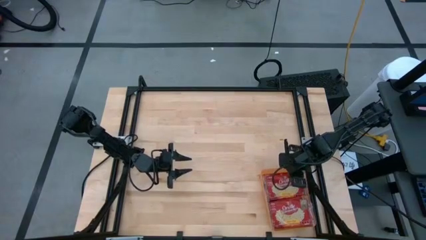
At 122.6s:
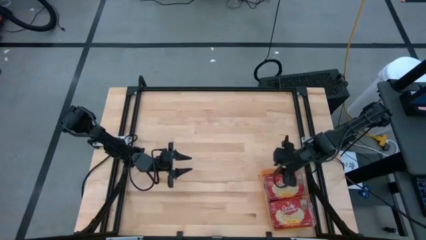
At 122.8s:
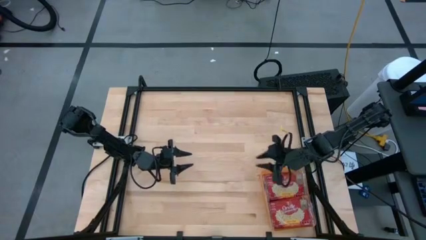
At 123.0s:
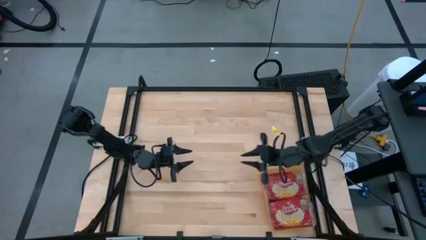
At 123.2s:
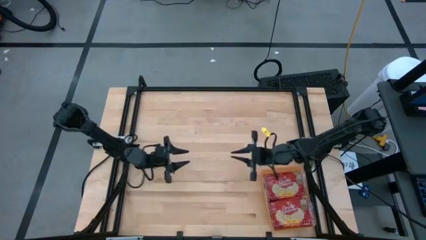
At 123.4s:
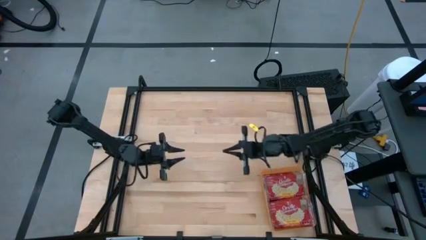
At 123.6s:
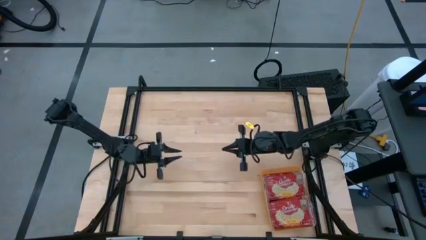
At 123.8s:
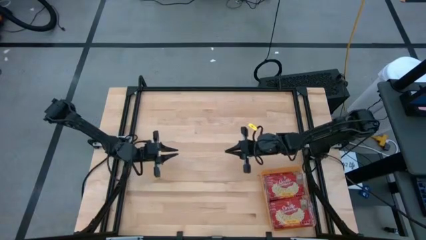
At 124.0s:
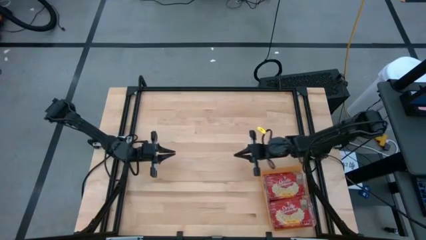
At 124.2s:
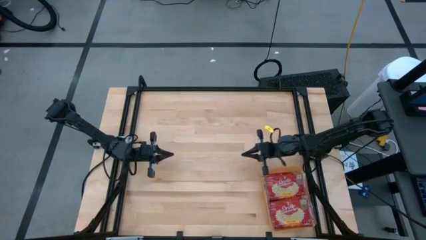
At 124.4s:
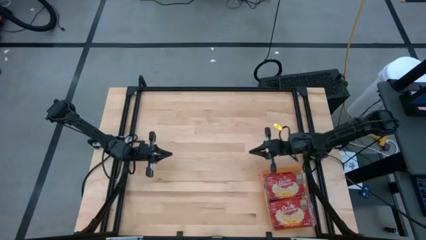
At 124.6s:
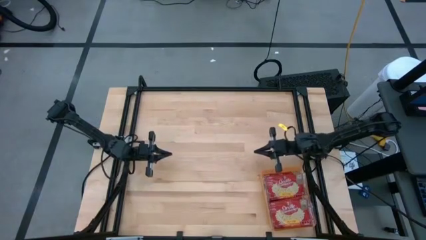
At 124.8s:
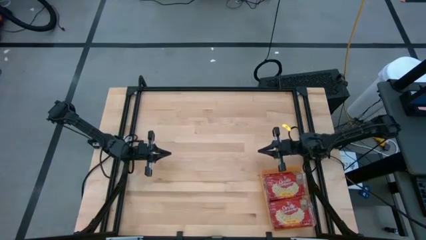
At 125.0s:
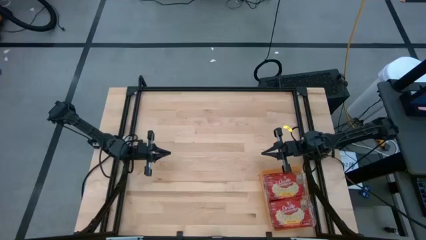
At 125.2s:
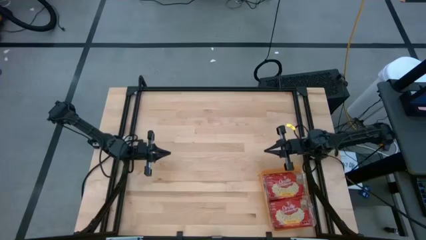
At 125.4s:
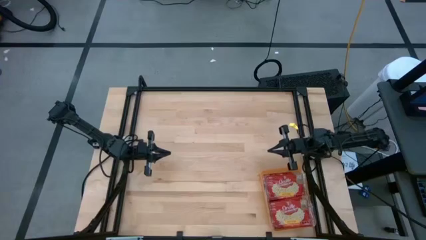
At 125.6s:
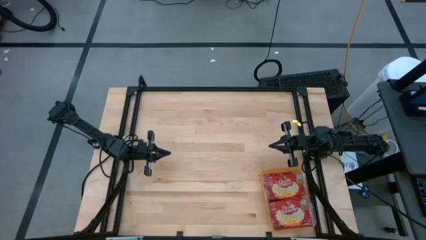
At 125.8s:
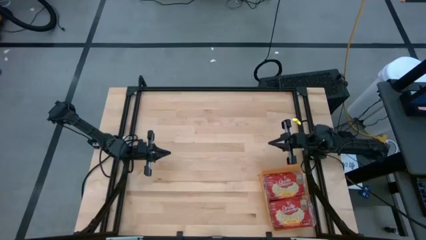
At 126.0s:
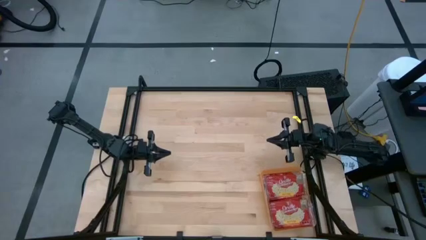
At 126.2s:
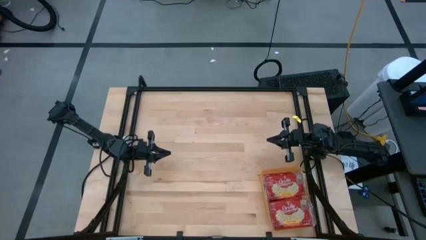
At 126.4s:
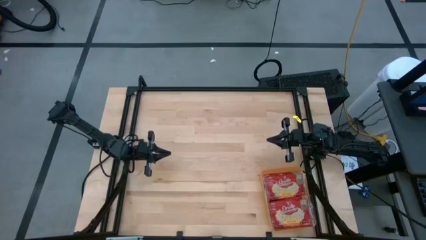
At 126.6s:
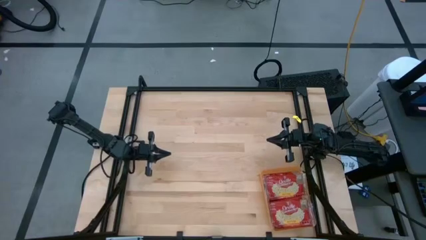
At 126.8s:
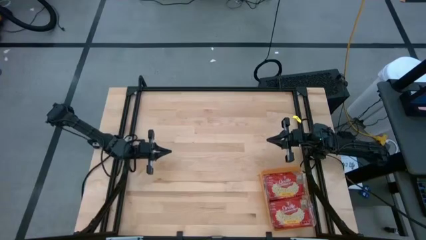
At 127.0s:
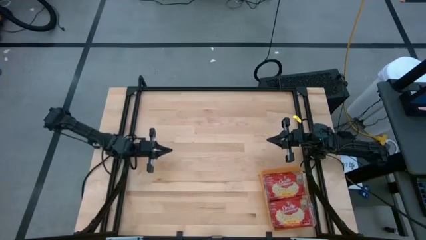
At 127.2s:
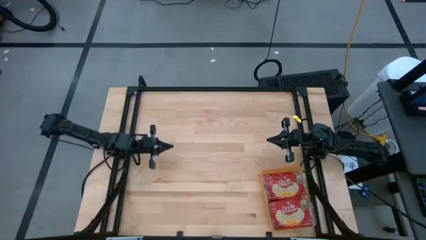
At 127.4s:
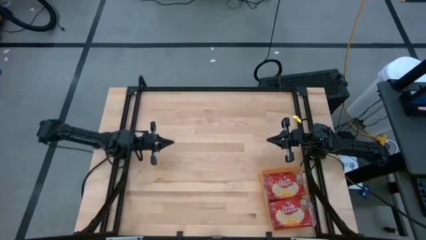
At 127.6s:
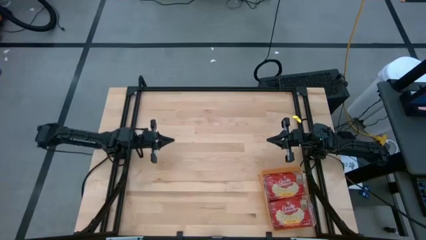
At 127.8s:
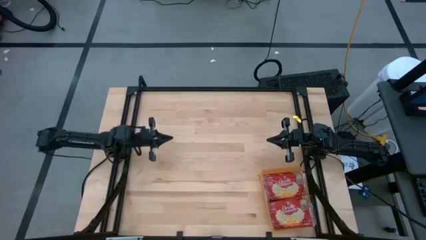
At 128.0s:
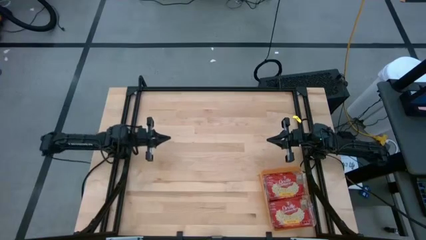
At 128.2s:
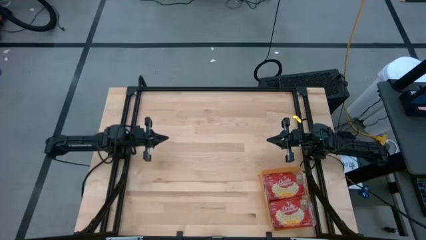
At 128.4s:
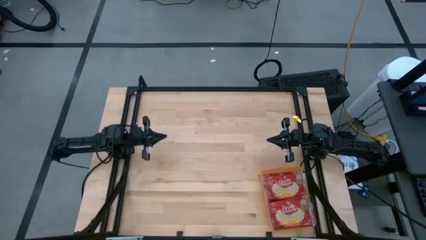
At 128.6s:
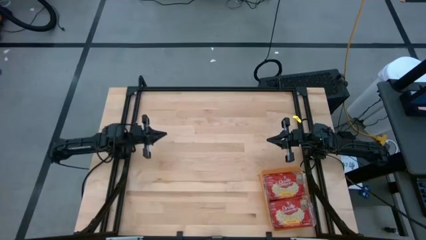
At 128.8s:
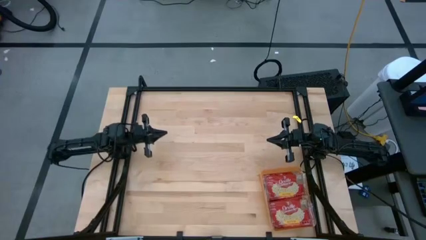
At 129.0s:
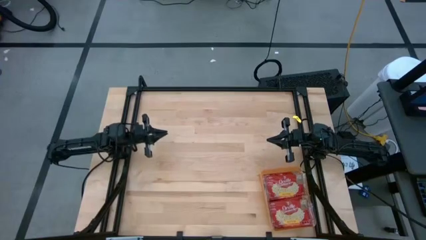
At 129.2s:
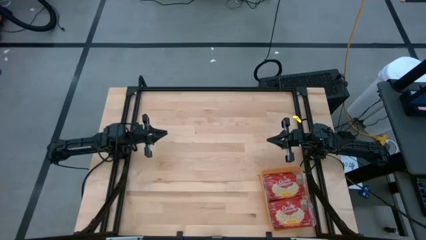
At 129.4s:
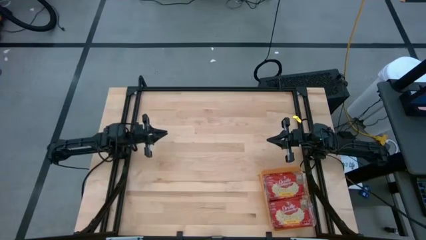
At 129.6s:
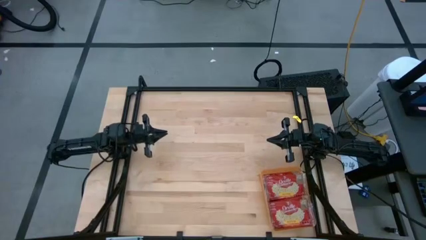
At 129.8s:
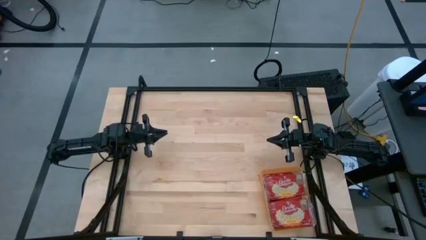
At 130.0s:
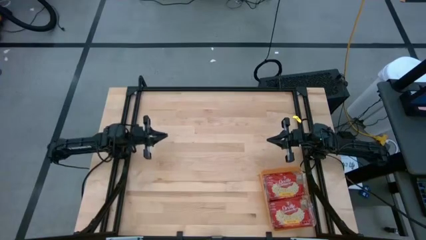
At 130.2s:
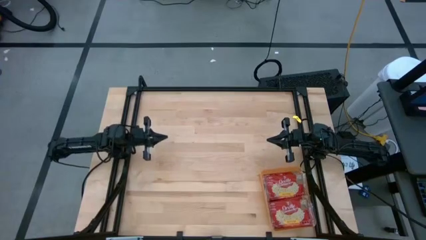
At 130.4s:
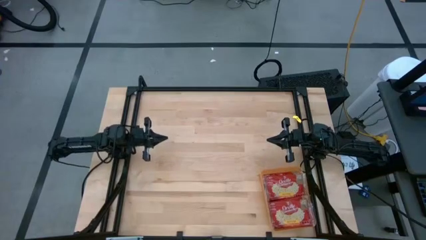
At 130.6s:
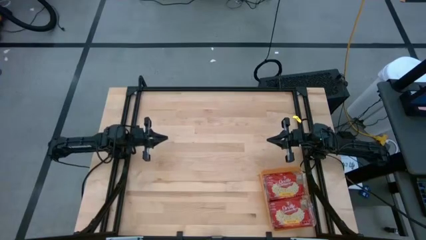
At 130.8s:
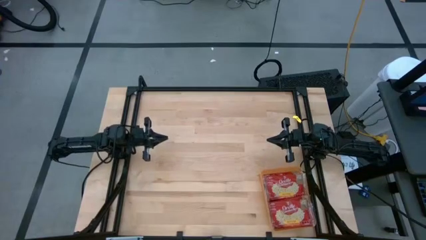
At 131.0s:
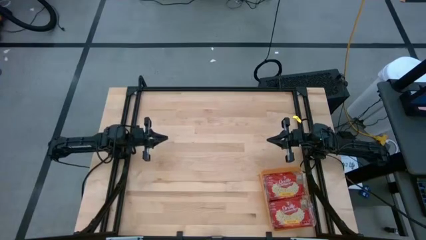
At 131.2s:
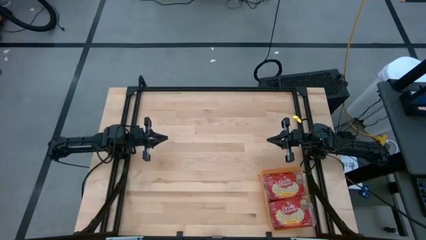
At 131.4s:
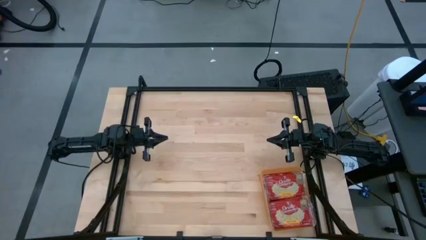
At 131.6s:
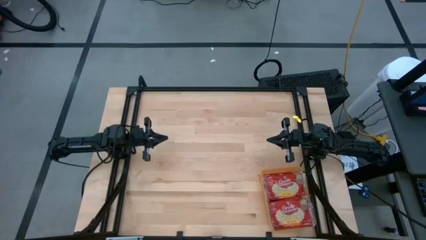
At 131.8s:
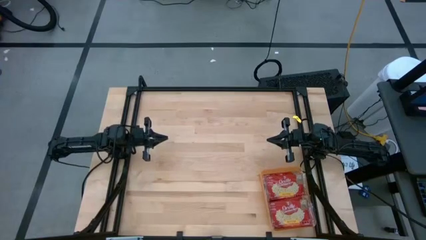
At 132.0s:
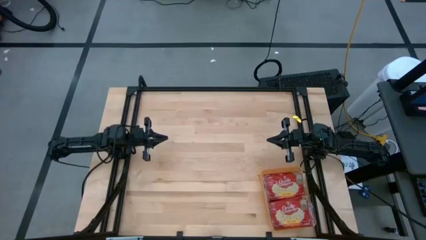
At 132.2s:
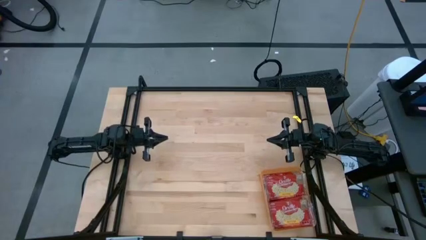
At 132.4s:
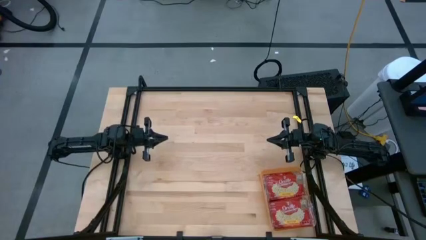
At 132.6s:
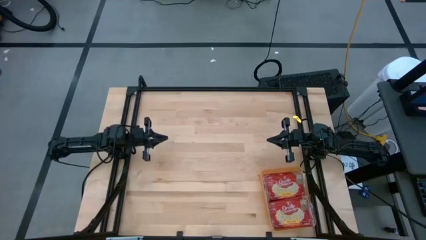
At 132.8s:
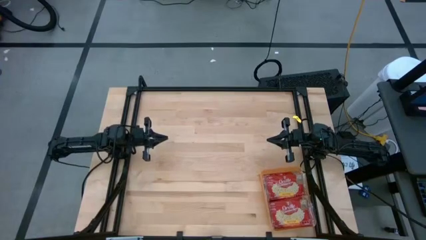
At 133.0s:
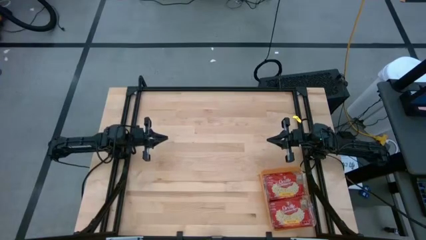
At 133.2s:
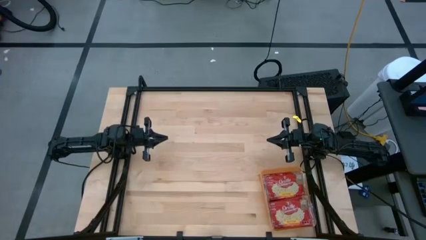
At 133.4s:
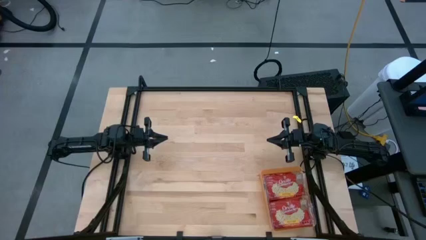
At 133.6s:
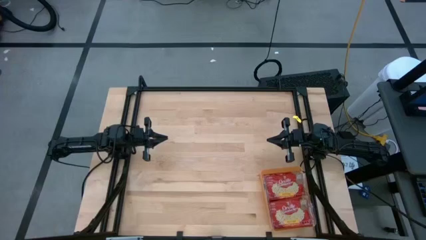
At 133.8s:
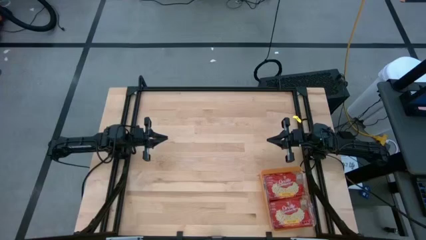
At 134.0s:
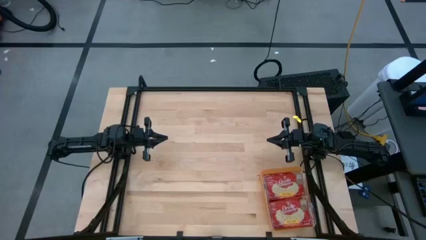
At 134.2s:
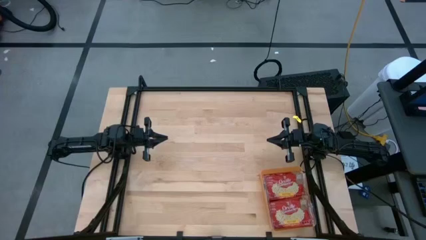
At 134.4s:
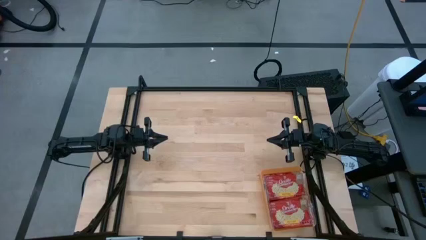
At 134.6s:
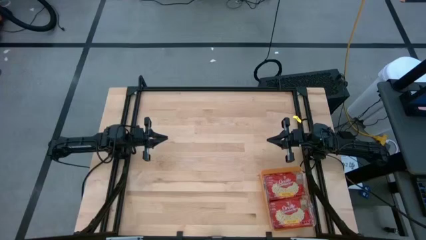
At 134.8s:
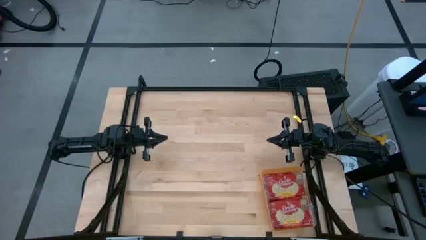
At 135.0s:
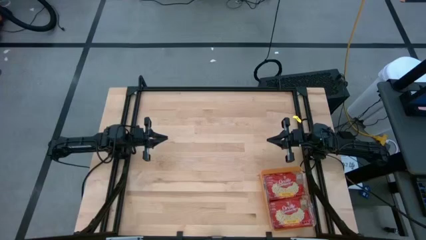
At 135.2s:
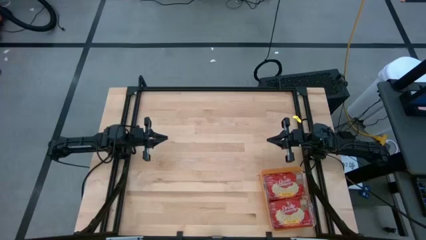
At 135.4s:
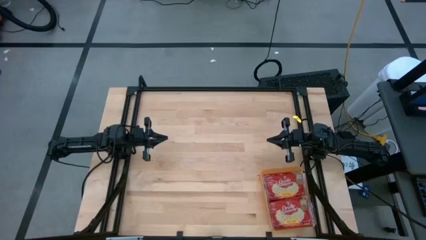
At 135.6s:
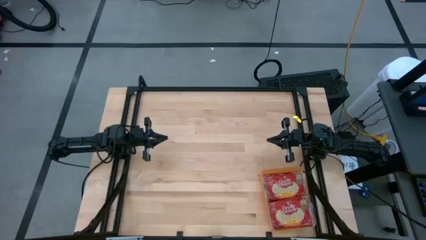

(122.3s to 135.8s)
Task: Sort popcorn bags into baskets
Return to Home Position

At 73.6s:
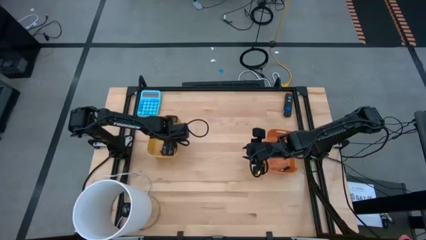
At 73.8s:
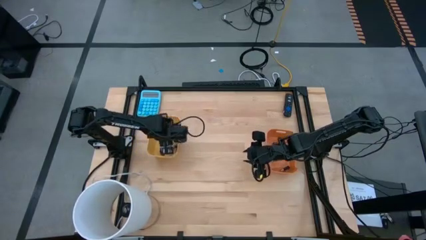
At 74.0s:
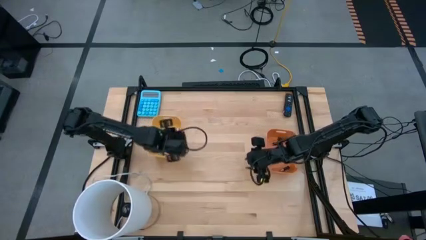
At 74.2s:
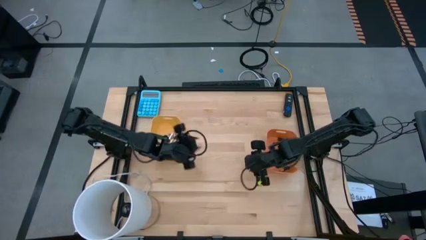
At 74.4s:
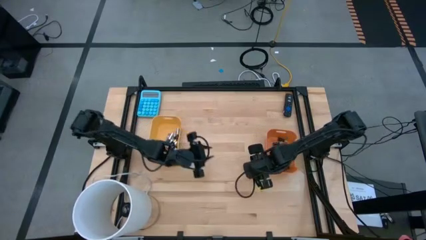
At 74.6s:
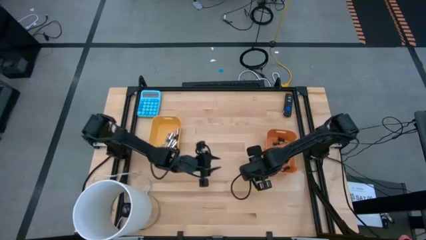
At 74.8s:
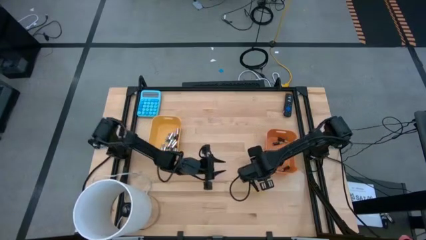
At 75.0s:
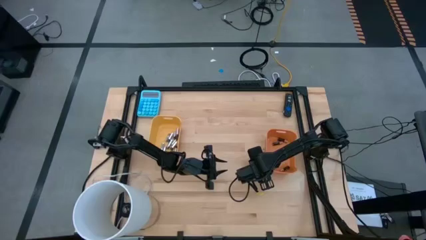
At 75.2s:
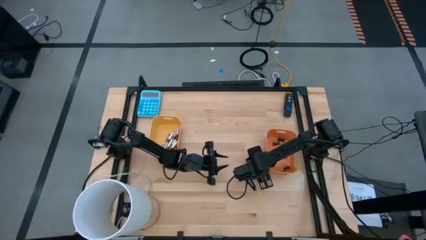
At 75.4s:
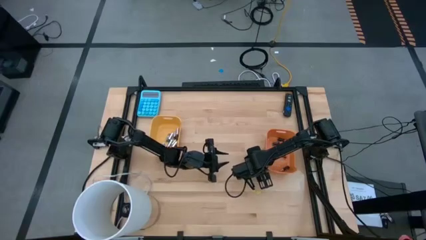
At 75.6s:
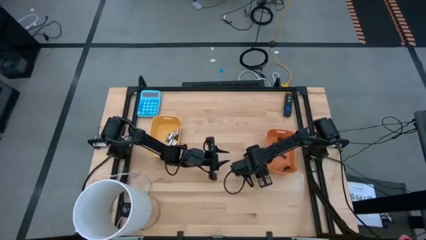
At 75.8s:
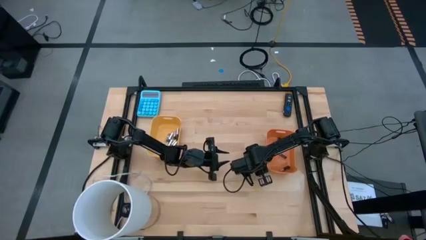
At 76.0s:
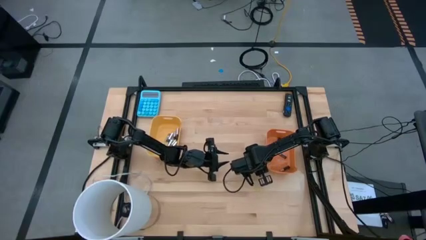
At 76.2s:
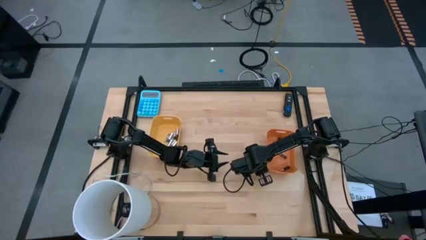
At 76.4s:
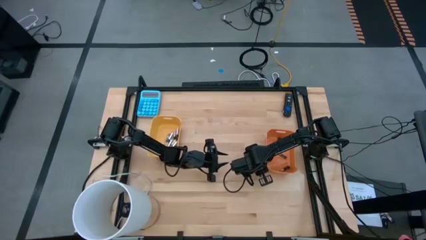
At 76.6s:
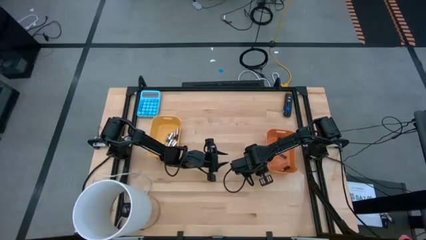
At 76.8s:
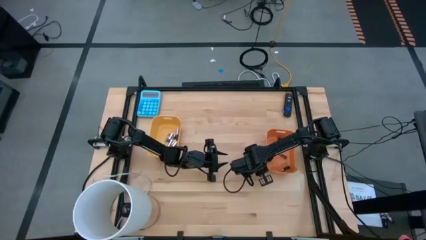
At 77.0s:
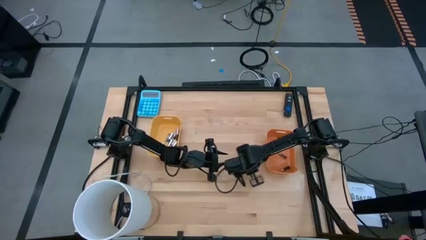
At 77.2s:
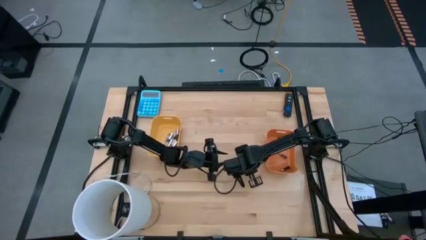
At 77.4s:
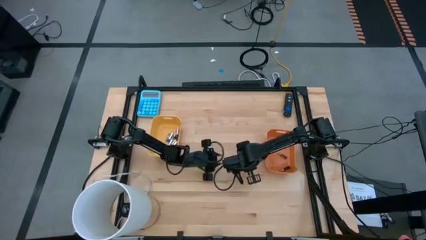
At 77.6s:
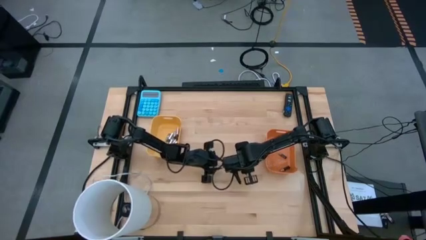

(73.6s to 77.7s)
Task: Sort batteries
Put the black battery into the orange bin

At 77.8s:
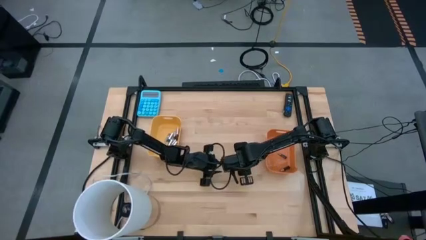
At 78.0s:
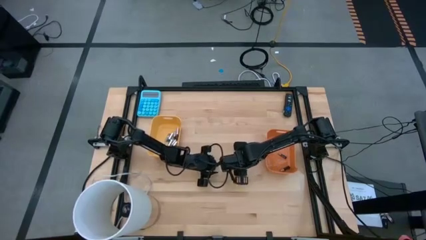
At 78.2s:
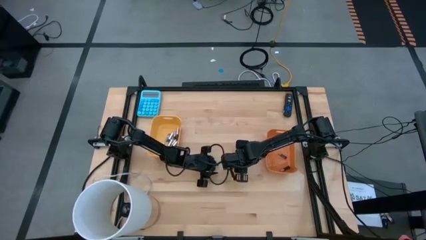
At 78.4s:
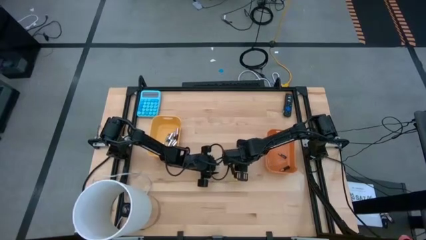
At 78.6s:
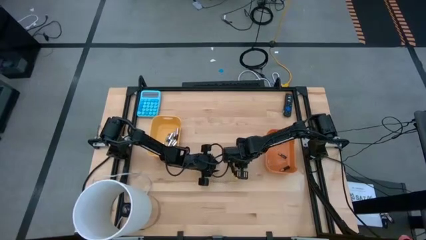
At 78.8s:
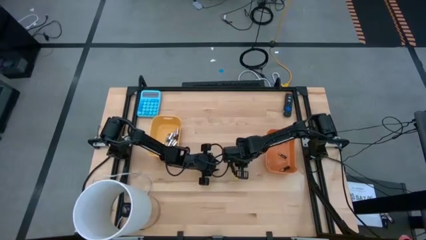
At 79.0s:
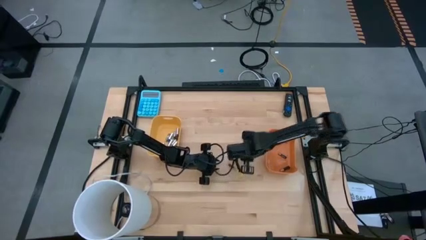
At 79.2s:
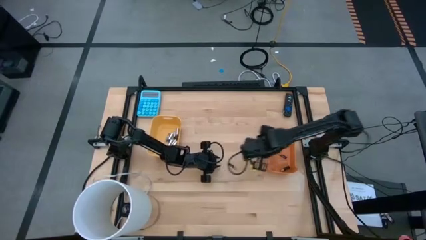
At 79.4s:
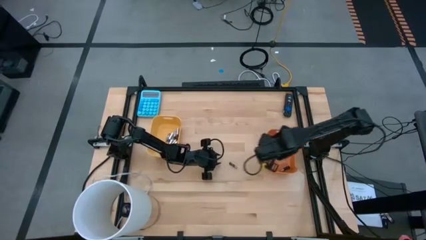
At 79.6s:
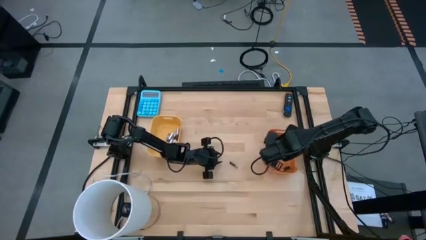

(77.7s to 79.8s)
Put the black battery into the orange bin
